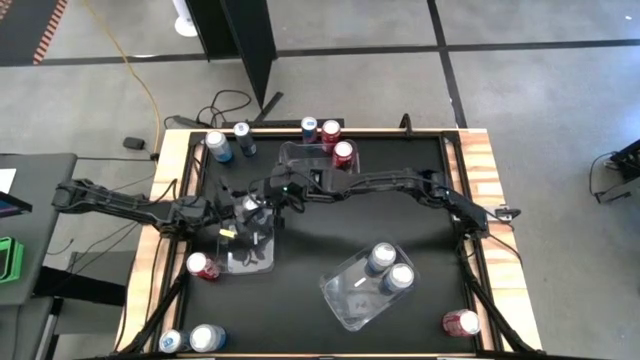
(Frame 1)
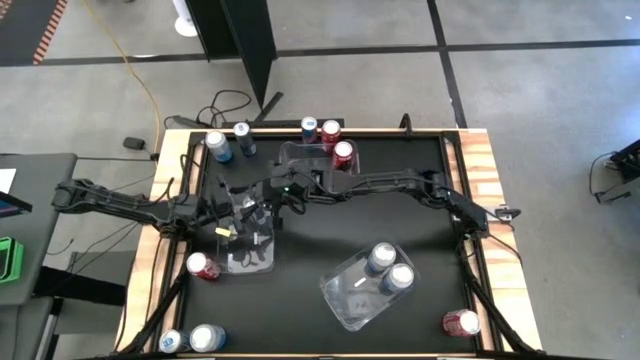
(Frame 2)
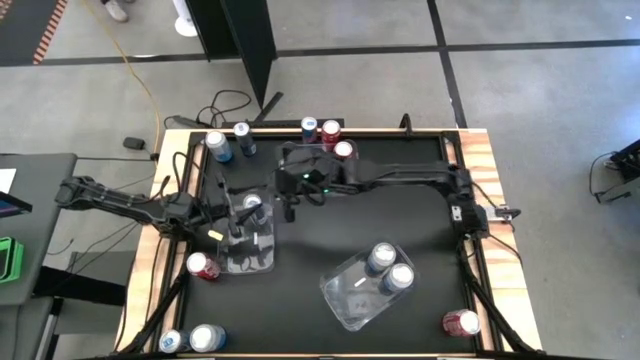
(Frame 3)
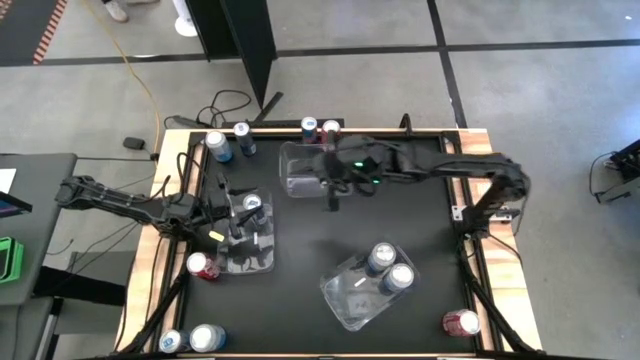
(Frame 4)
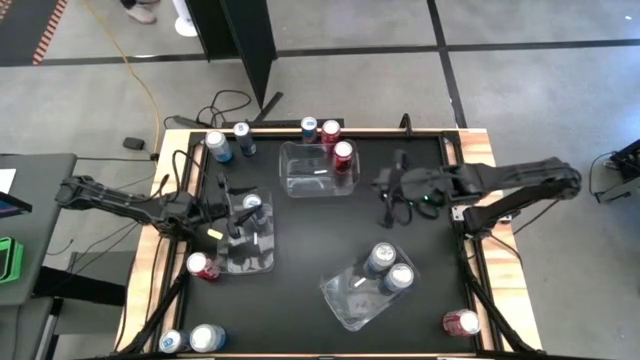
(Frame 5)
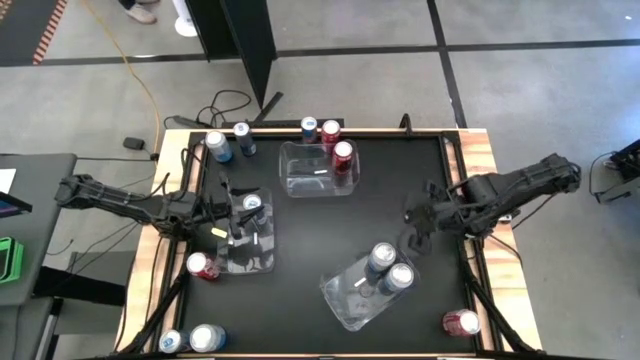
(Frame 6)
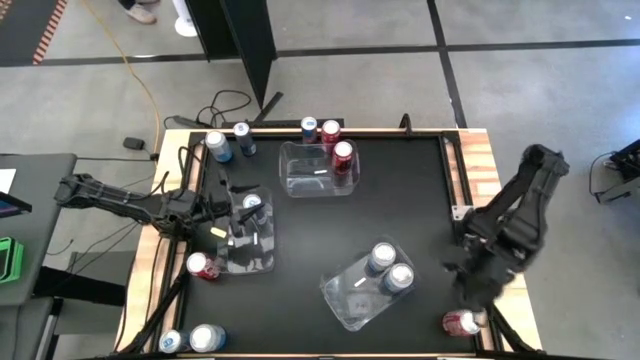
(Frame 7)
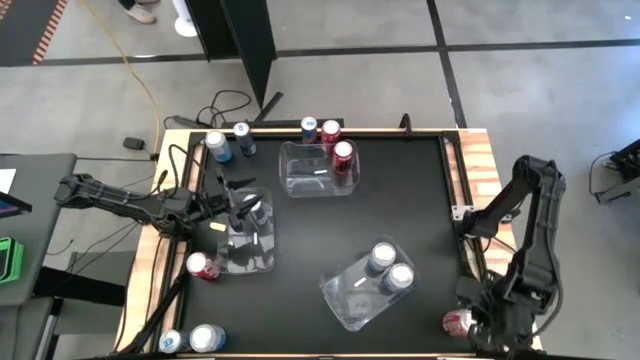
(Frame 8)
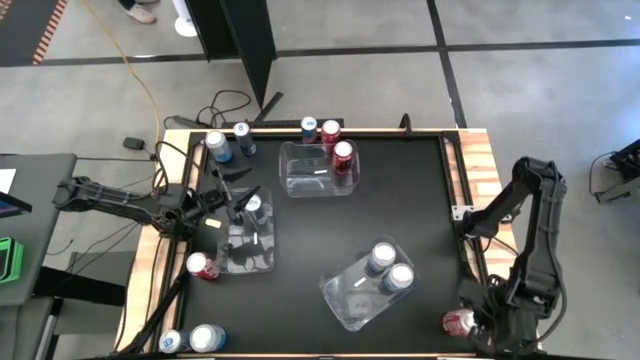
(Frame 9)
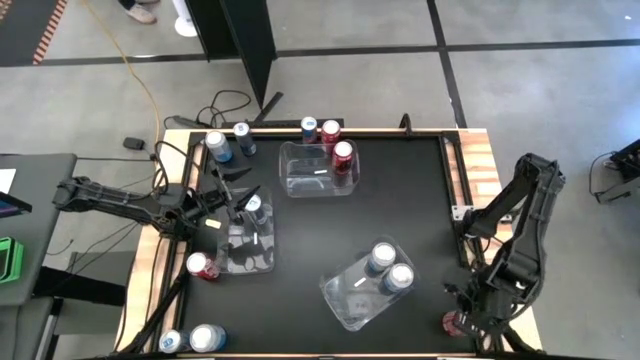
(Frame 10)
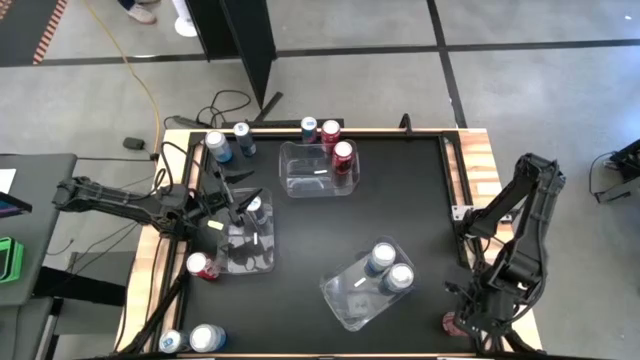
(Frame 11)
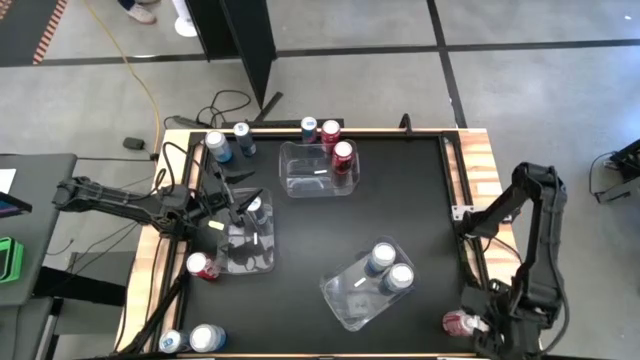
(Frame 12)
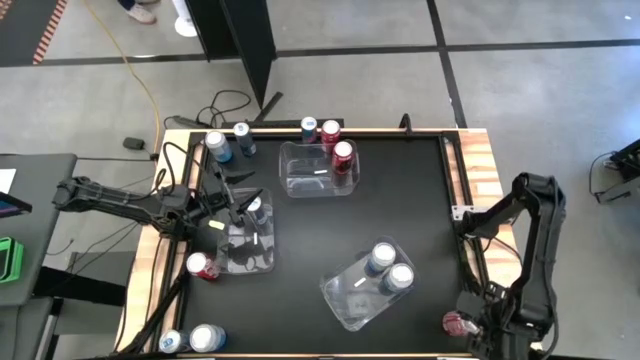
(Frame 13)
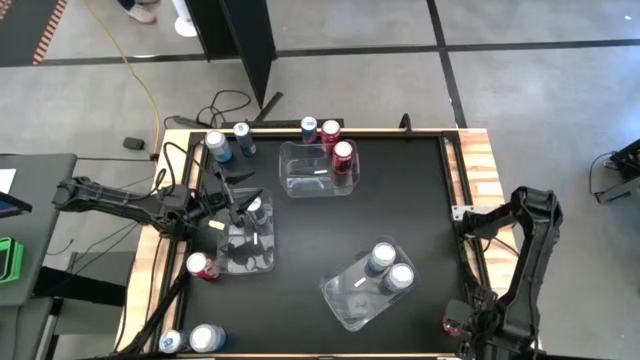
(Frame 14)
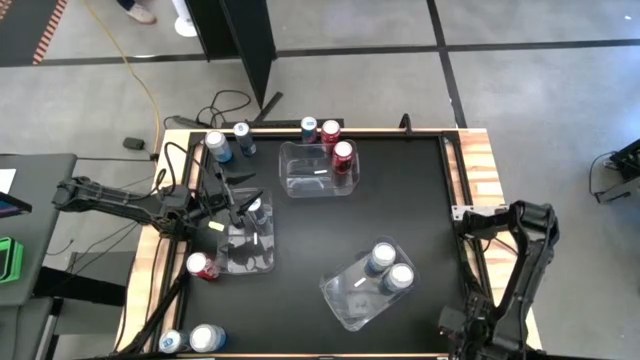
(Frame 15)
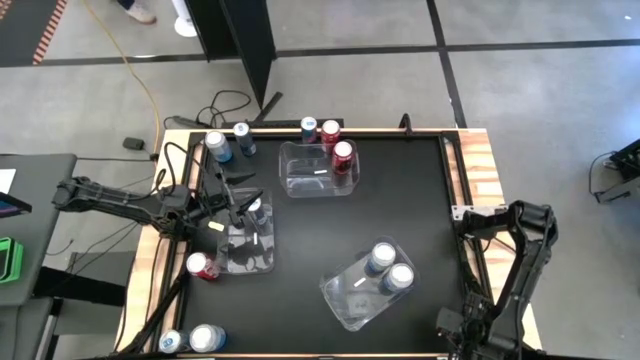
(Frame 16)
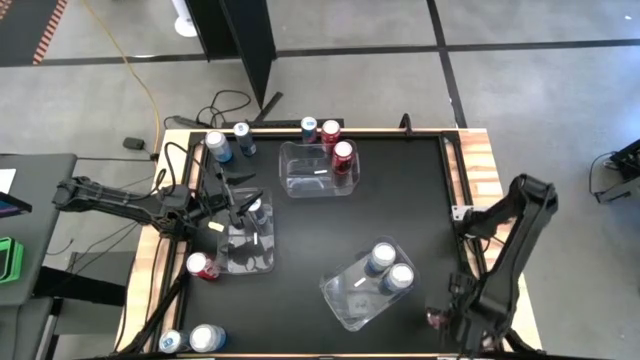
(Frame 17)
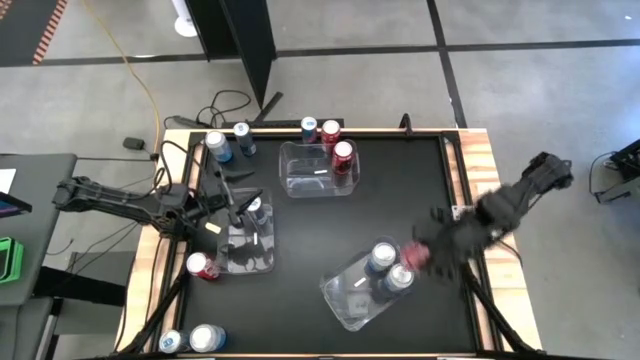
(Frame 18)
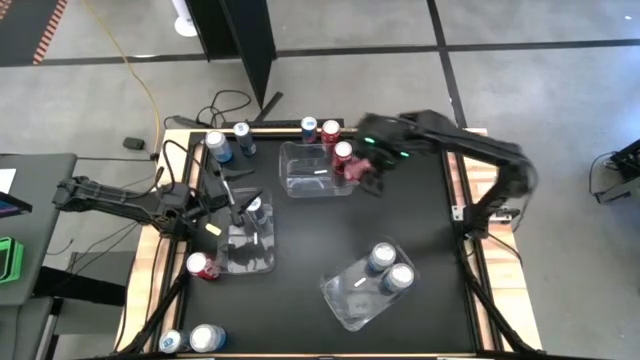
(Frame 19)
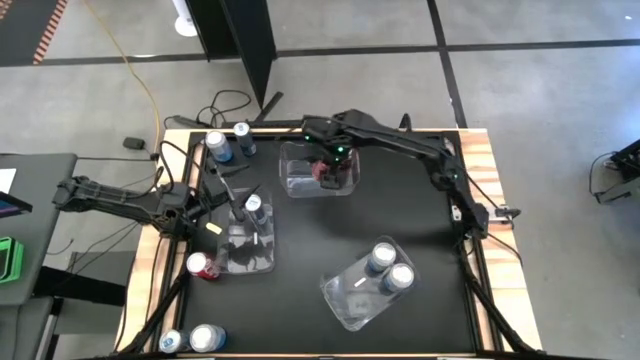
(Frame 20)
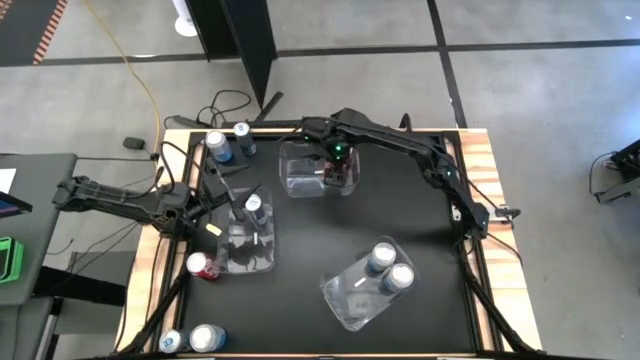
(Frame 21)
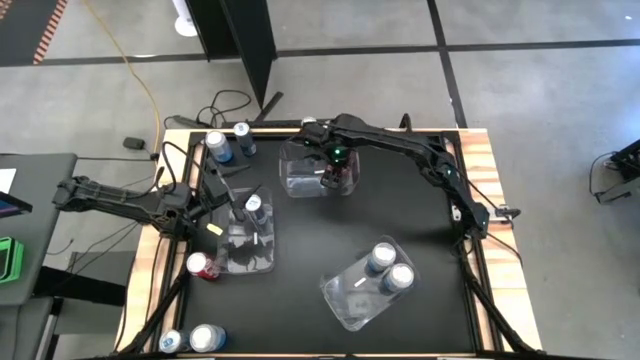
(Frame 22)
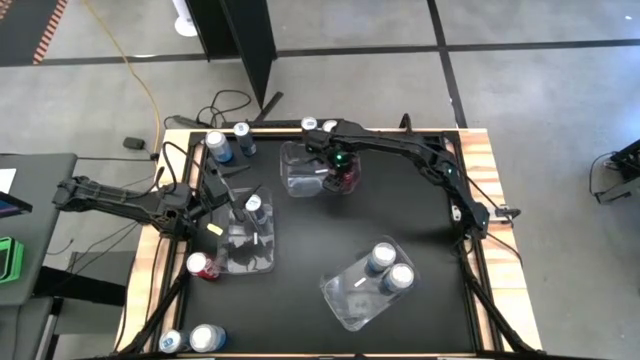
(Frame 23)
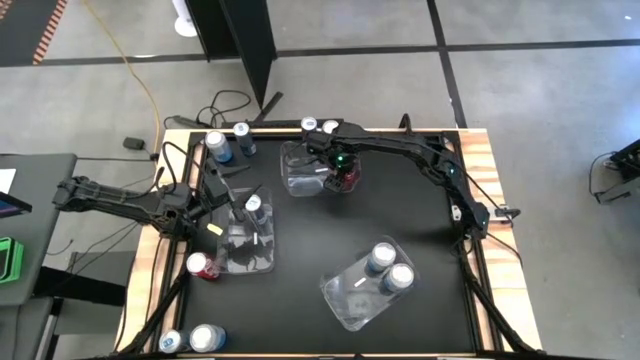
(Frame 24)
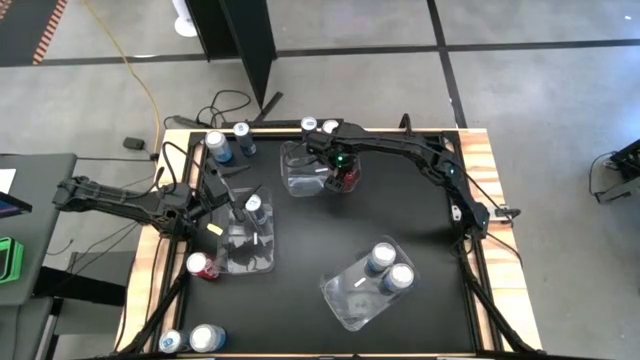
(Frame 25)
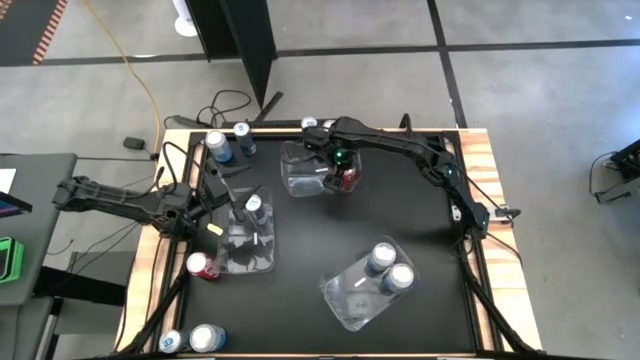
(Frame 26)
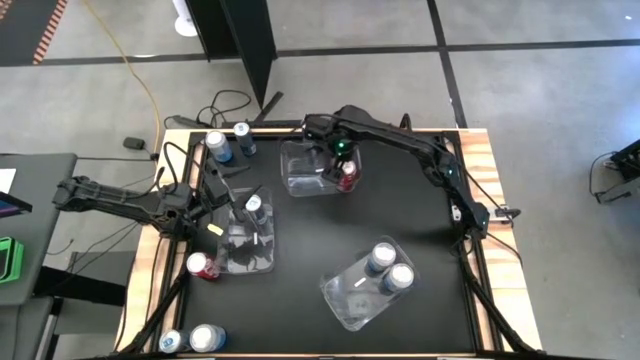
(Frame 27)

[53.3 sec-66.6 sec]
Task: Sort soda cans
Put the red soda can into the top transparent bin

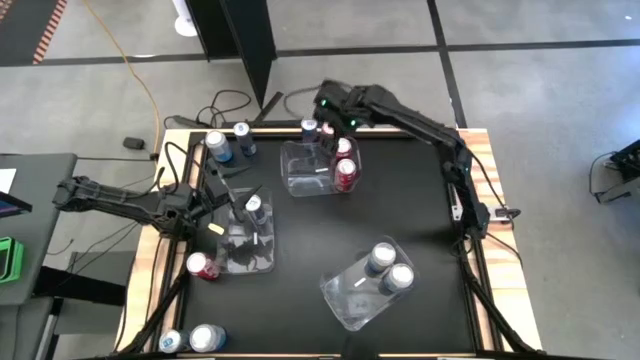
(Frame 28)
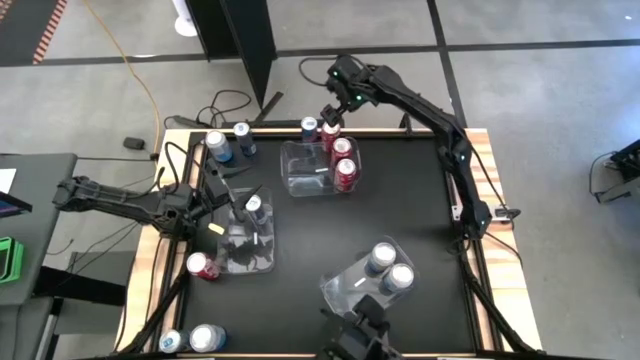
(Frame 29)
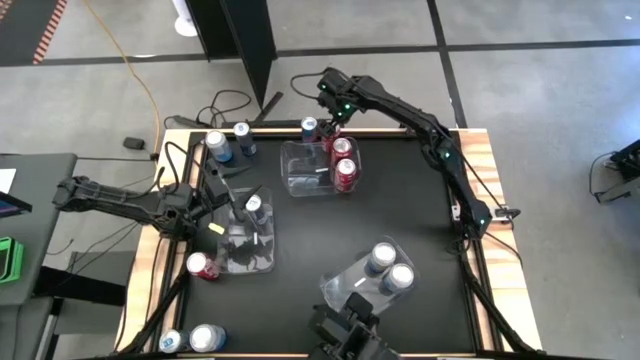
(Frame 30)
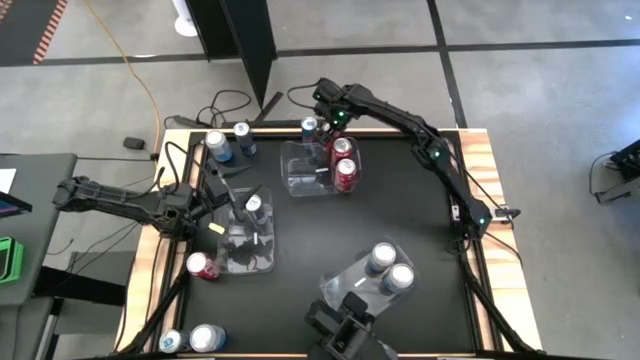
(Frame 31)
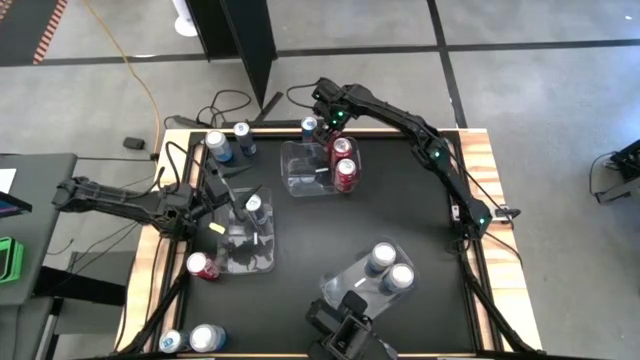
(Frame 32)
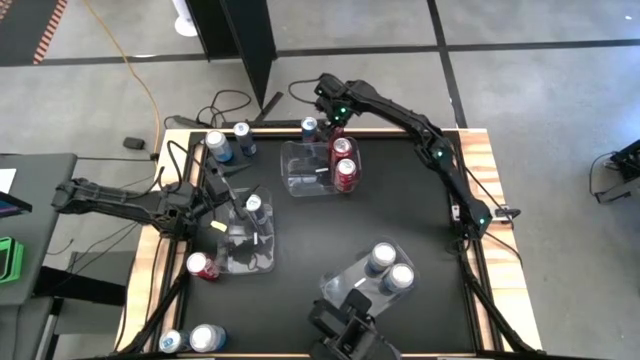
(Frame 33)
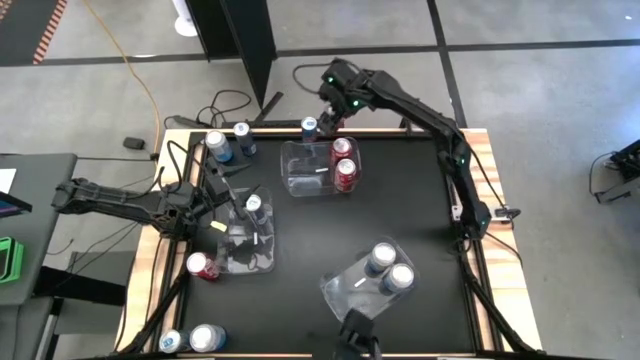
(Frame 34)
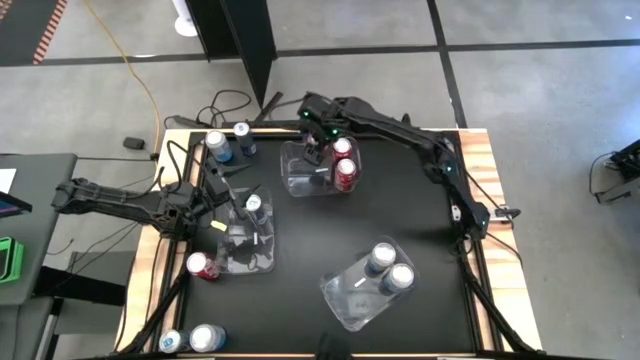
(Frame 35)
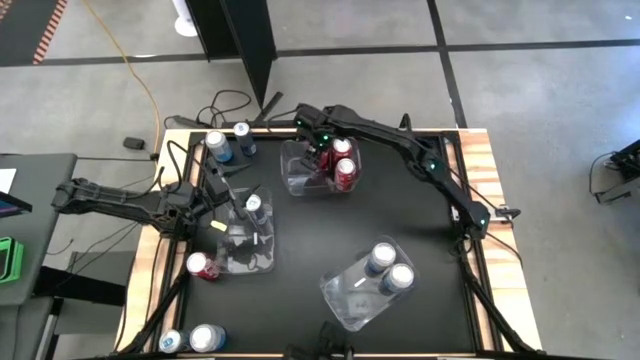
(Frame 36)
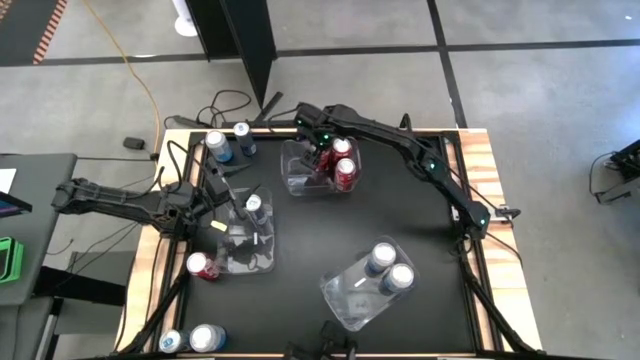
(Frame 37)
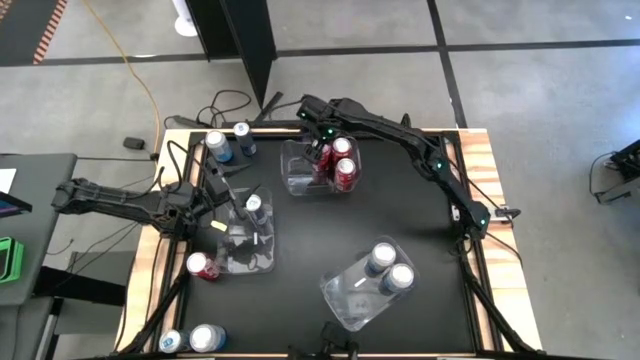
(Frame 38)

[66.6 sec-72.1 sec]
Put the red soda can into the top transparent bin

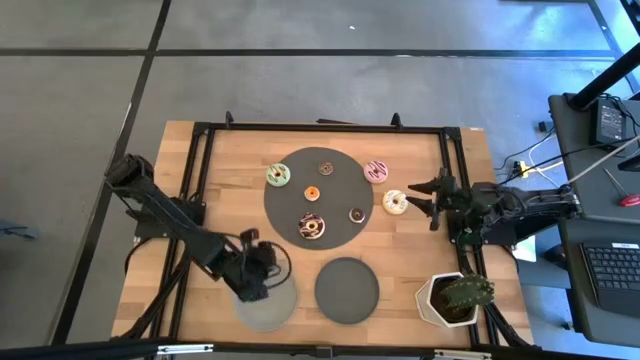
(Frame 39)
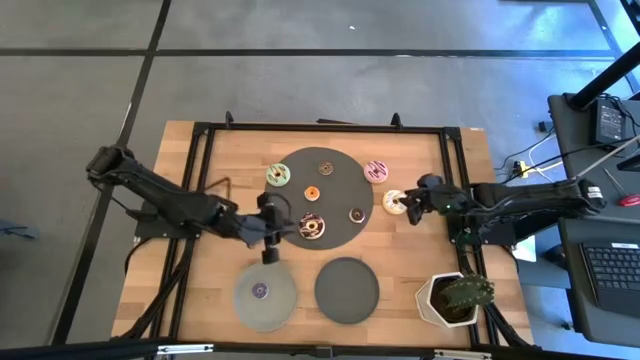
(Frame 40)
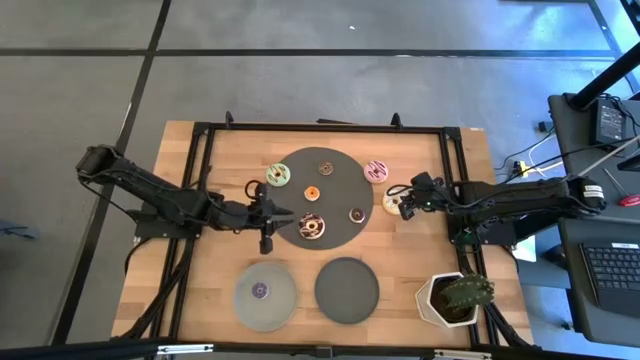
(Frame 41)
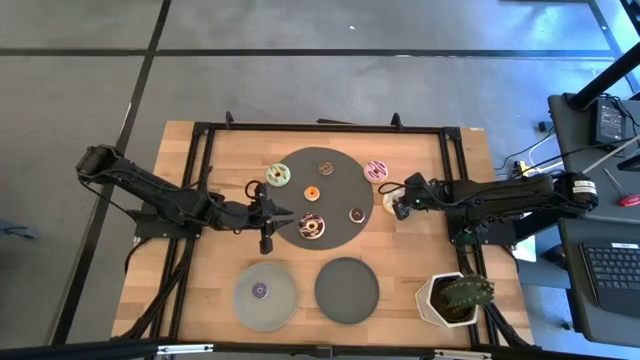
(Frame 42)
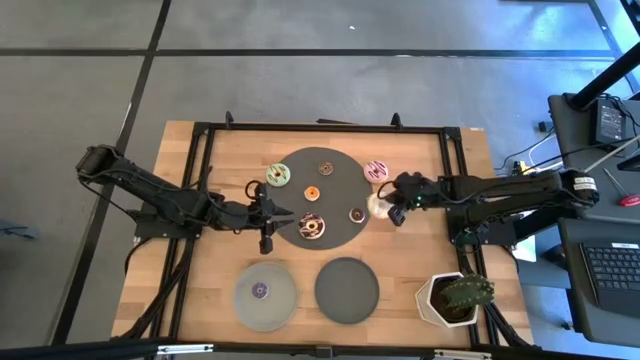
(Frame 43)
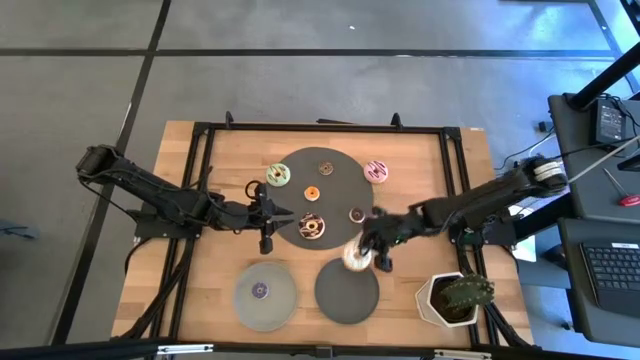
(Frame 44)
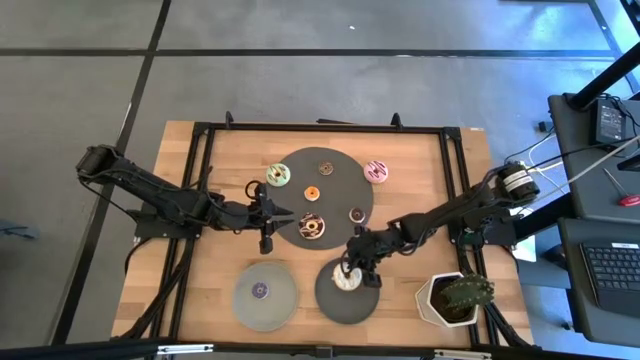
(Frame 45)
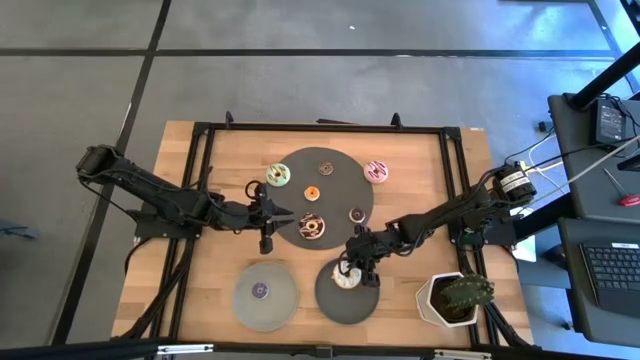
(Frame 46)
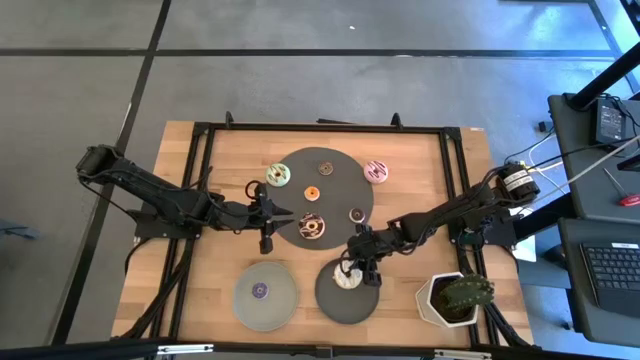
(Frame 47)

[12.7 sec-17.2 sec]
Task: Pick & Place donuts
Put the big white and blue donut on the dark gray plate
